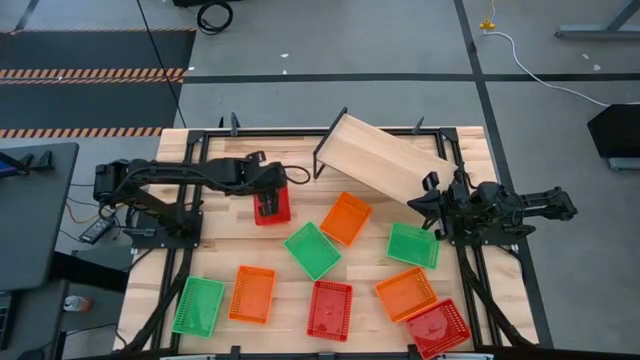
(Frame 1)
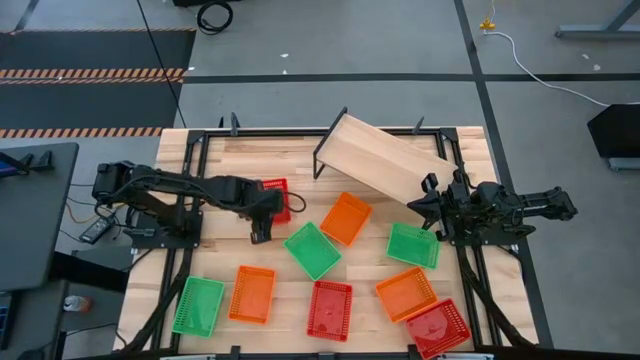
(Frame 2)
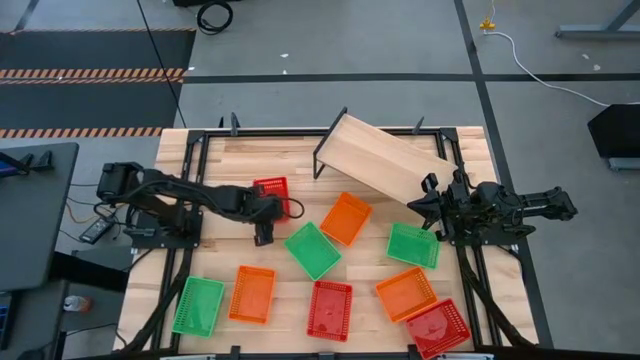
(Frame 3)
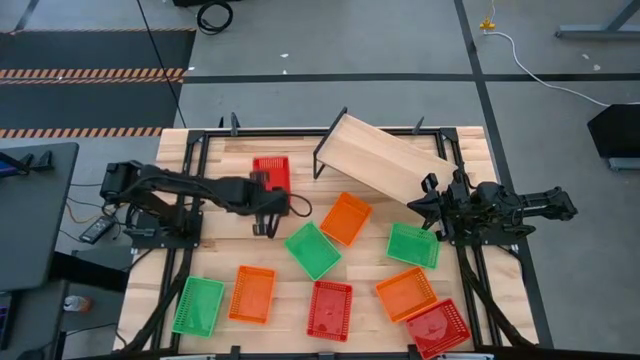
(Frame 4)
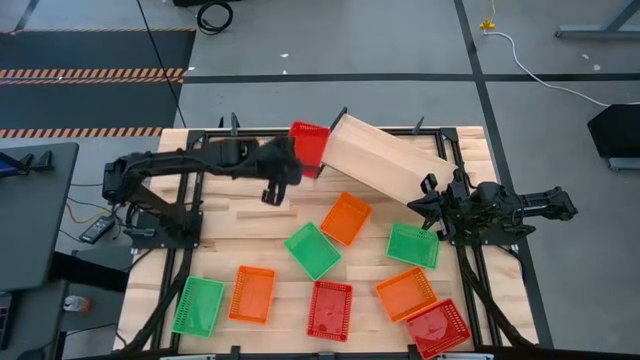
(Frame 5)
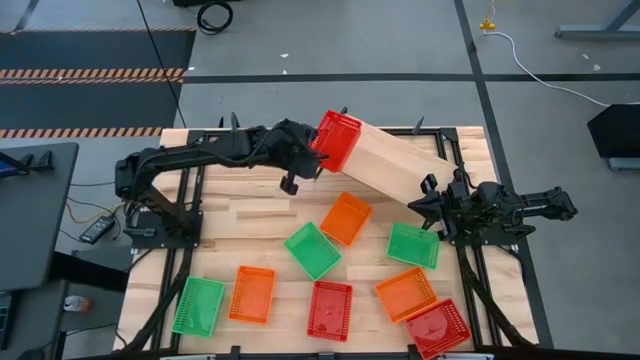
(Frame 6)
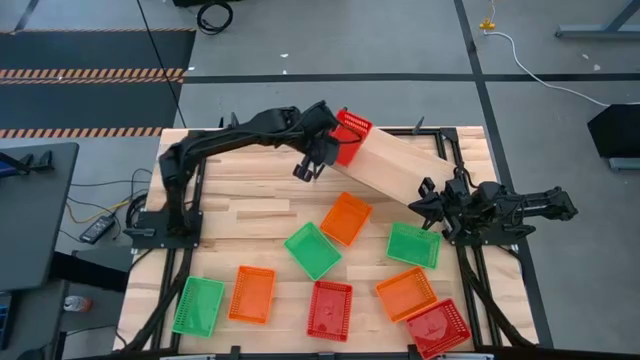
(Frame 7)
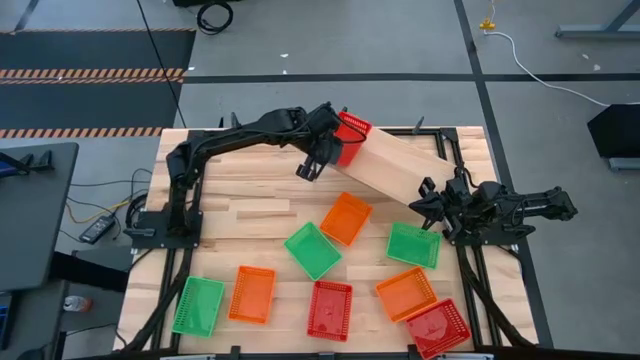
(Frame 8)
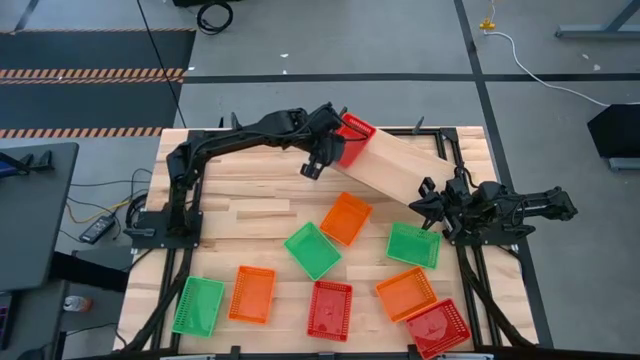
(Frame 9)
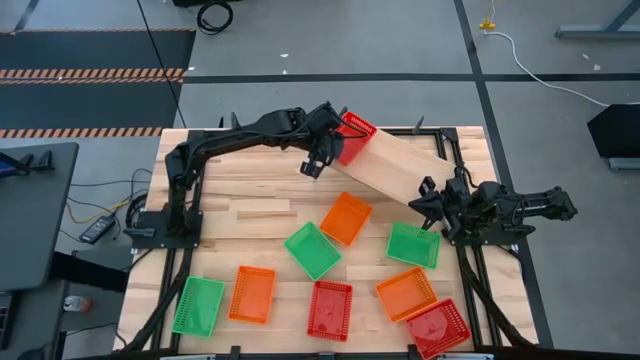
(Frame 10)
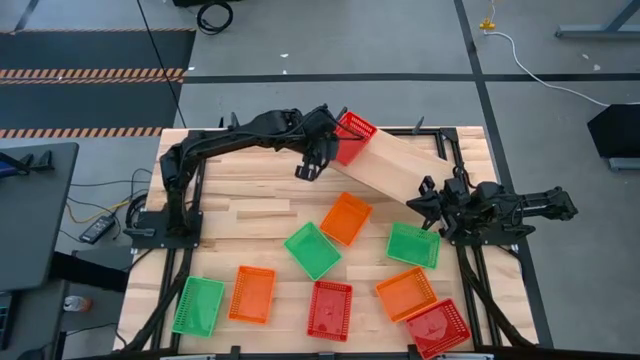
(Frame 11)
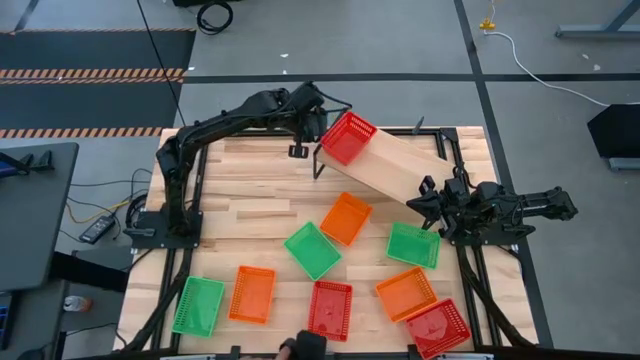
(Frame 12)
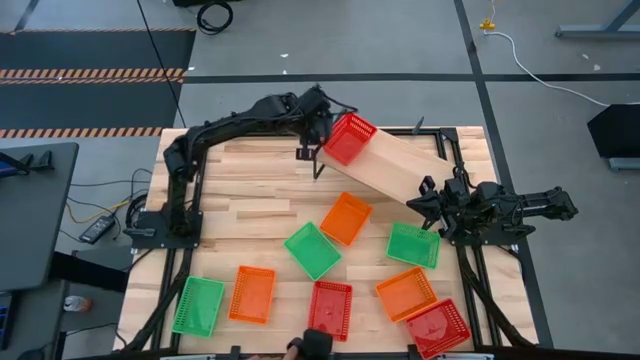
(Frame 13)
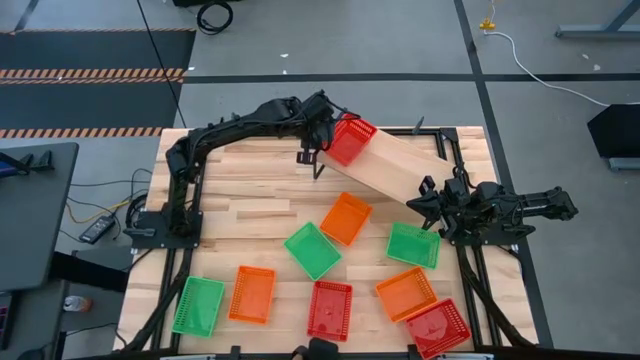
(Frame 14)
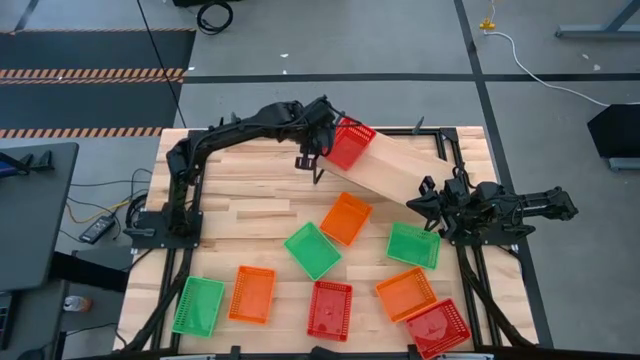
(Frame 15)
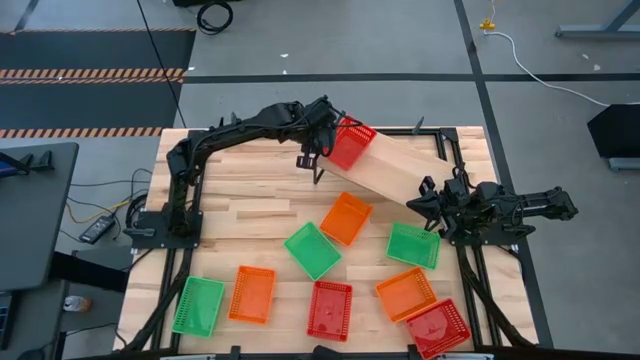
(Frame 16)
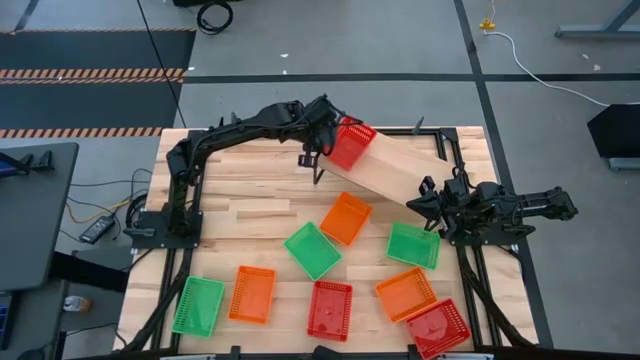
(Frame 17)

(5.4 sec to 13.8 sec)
Task: Stack baskets on shelf by color
Put the top red bin on the shelf

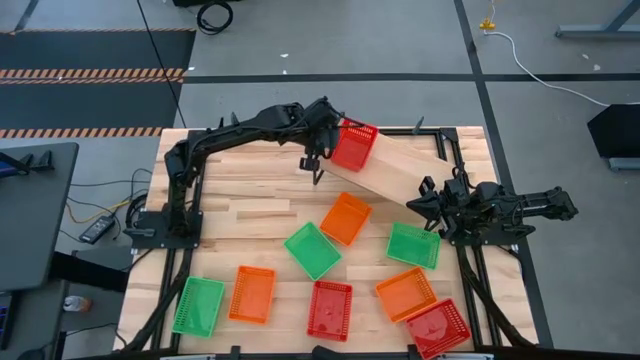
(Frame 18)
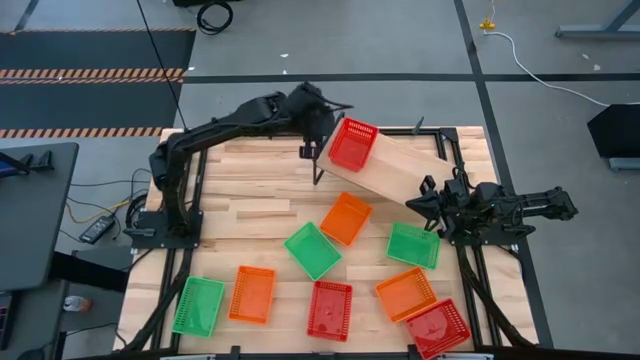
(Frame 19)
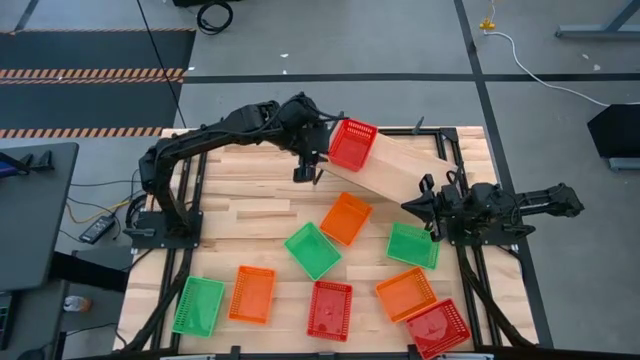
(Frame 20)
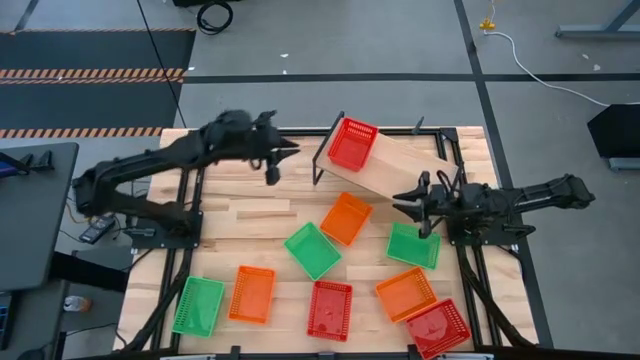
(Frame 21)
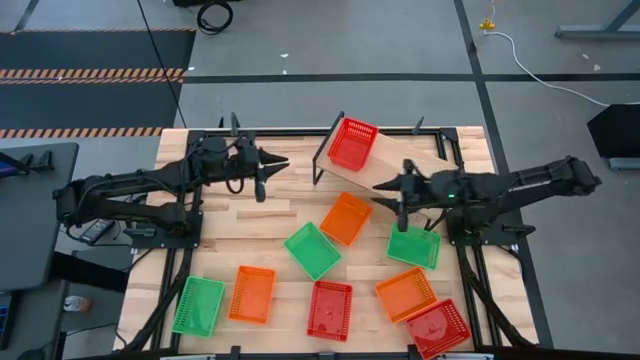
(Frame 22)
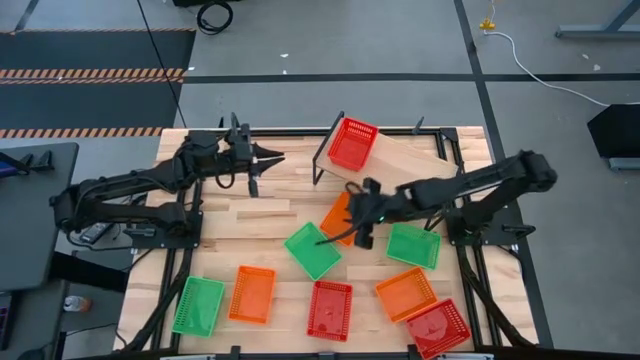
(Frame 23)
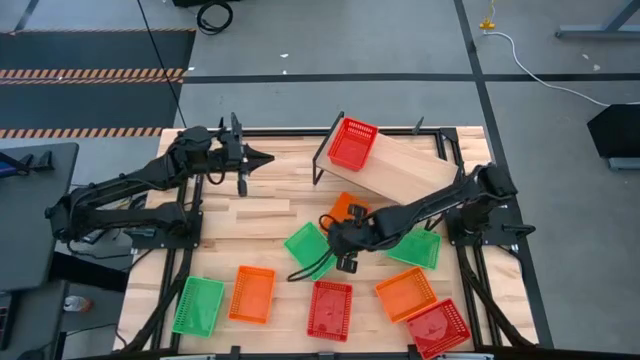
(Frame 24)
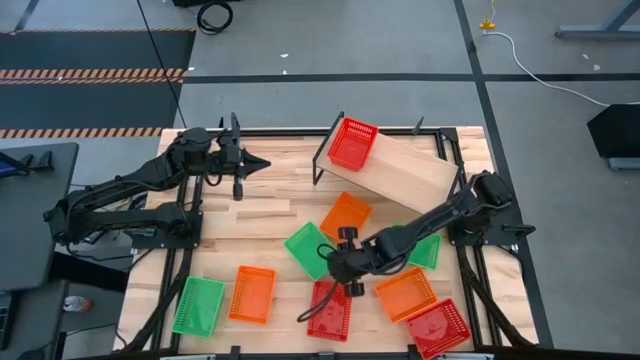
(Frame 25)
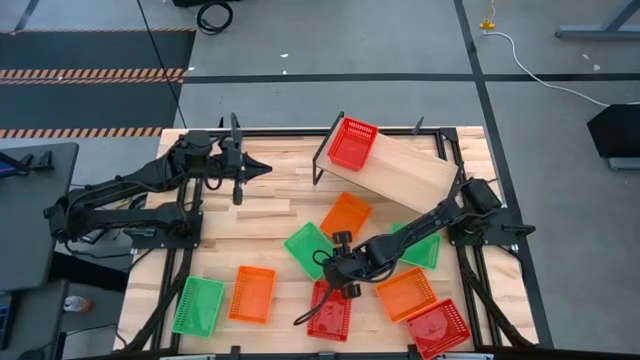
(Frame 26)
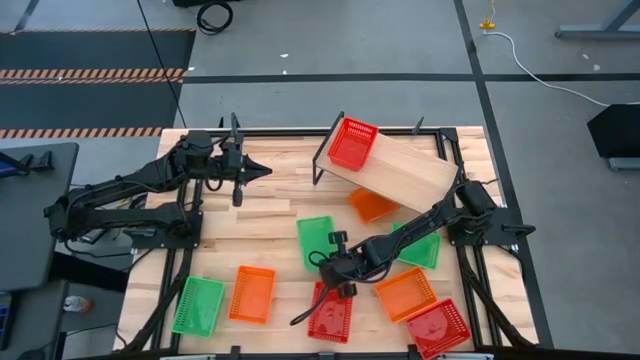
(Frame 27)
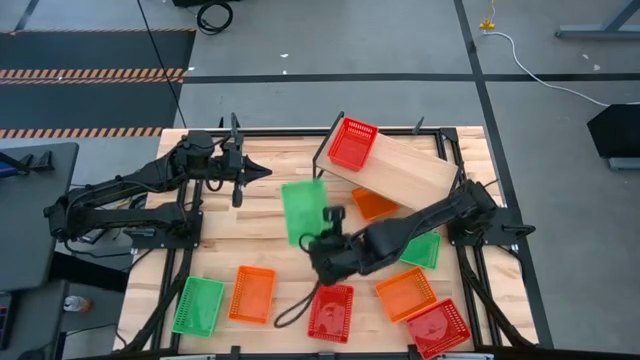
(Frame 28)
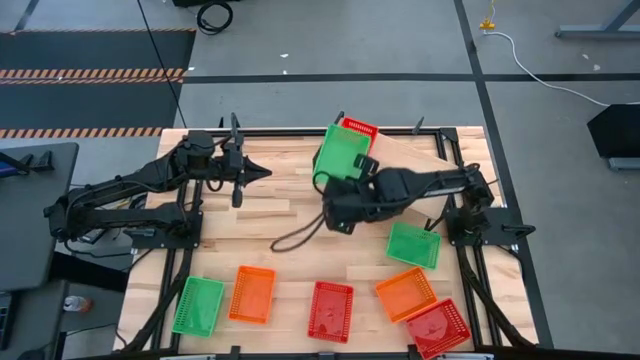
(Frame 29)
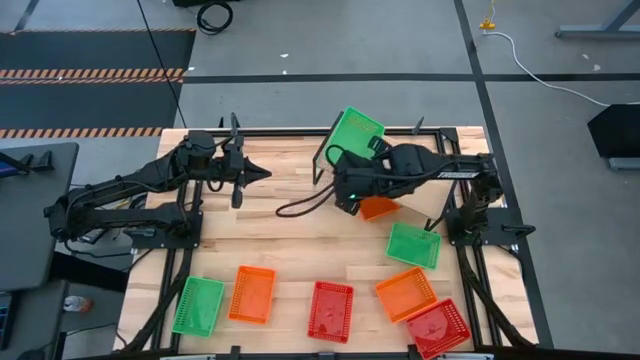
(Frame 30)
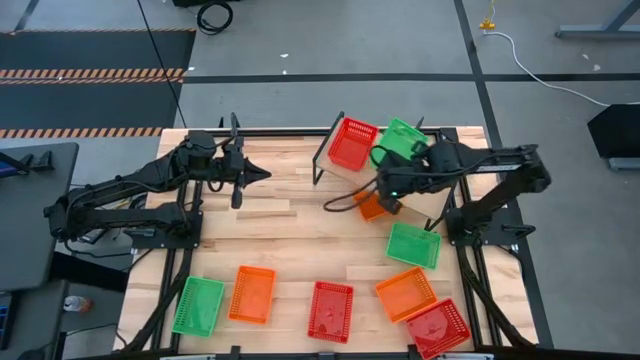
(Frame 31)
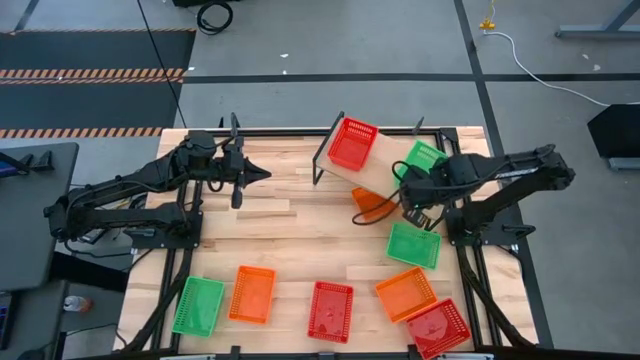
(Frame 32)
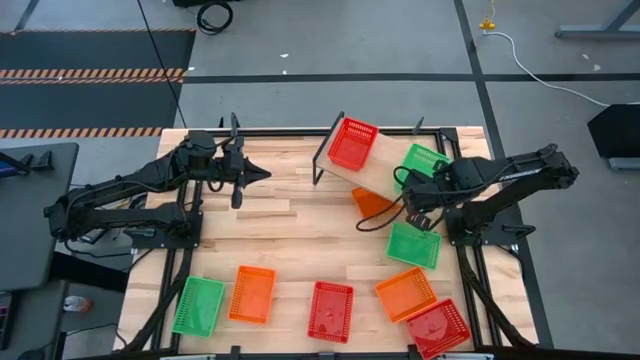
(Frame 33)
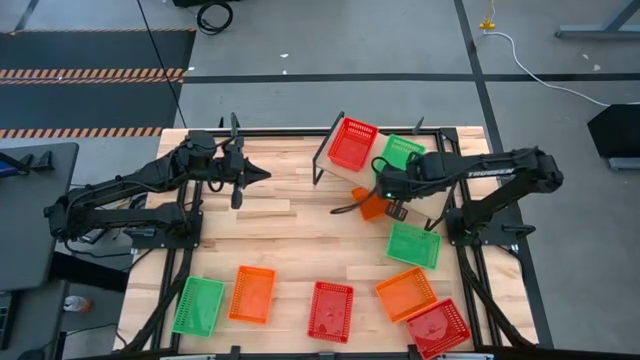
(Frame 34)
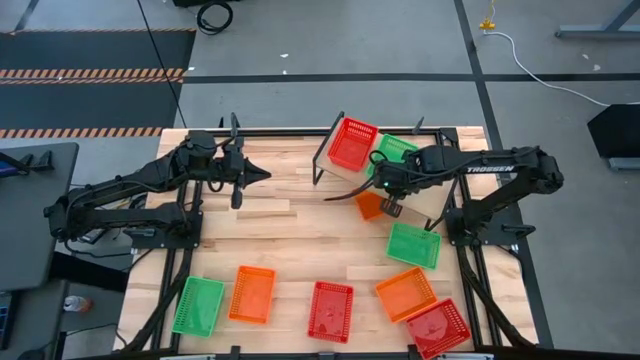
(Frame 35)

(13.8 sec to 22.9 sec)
Put the middle green bin on the shelf

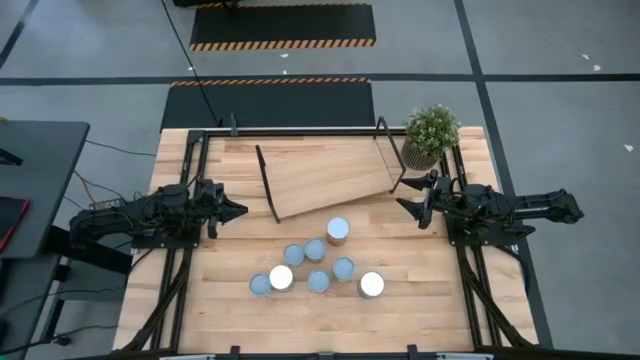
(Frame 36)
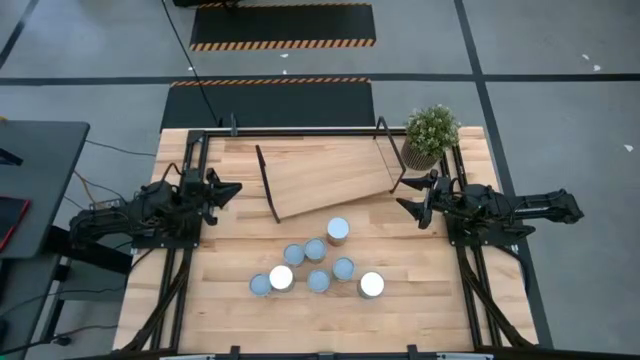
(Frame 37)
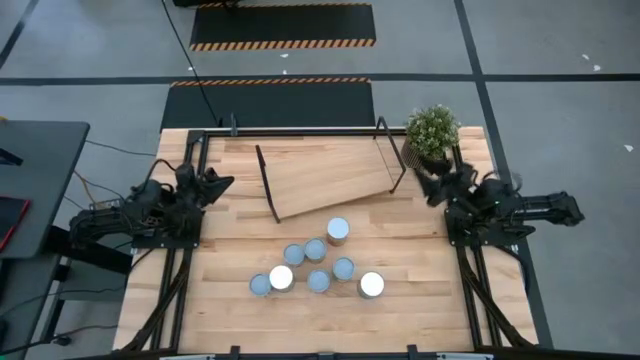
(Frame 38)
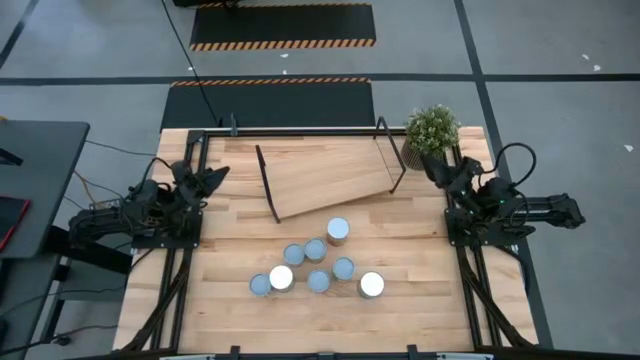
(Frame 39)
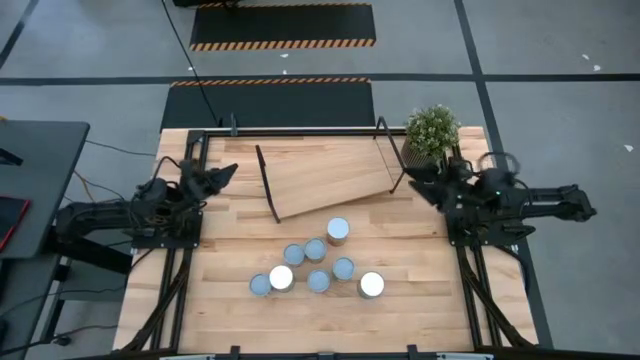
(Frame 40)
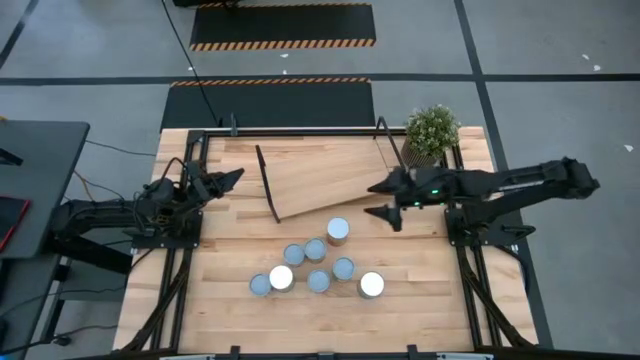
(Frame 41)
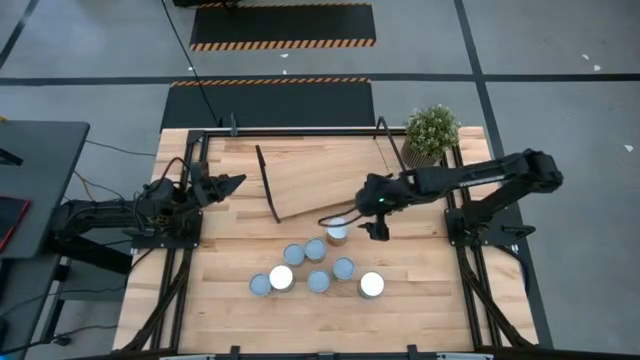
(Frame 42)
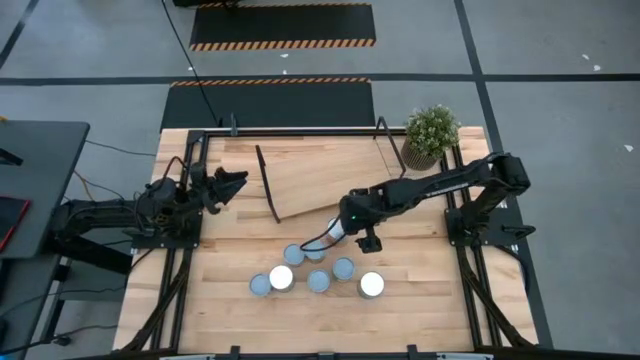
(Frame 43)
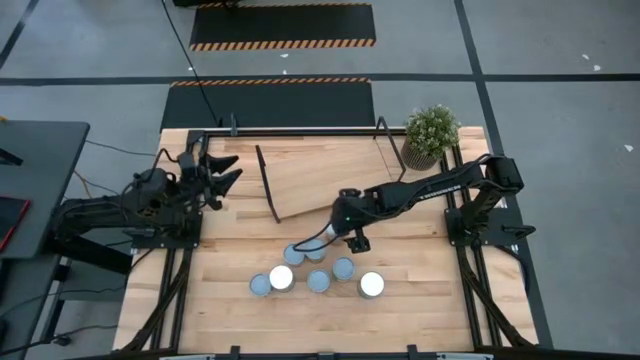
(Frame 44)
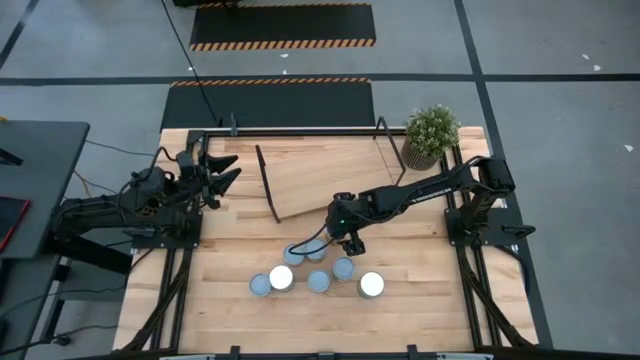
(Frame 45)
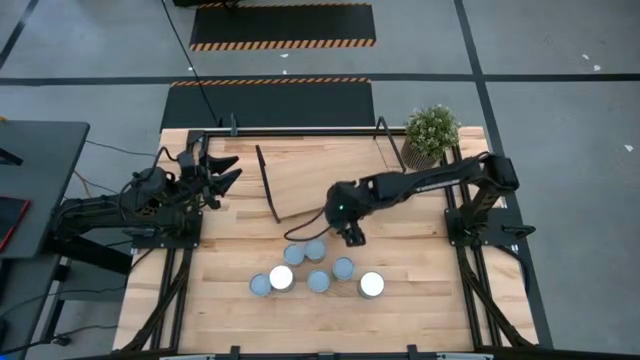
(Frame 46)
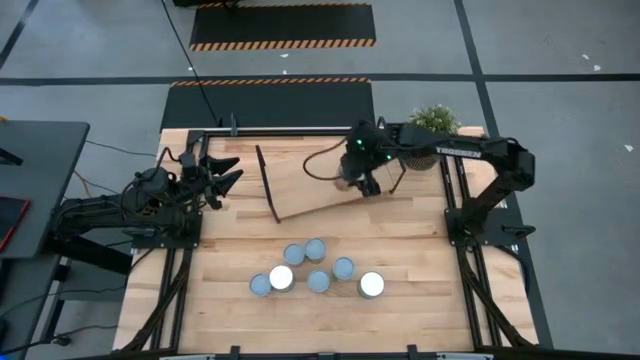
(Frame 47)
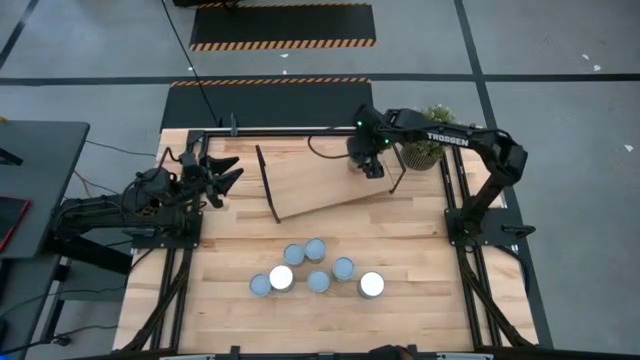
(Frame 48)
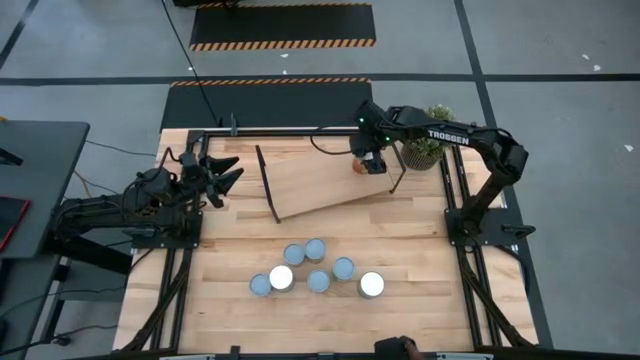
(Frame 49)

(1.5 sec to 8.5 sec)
Task: Pick and place cans onto a shelf
Put the canned pineapple on the shelf
